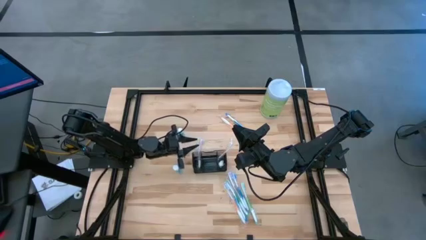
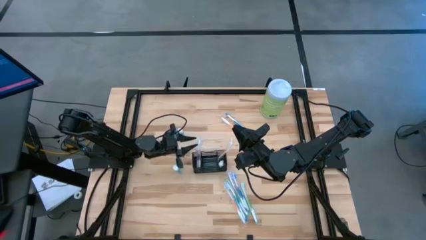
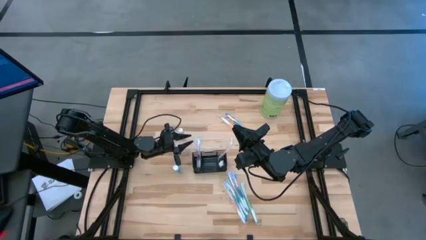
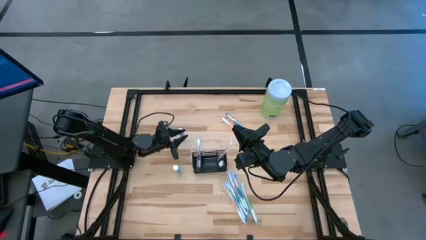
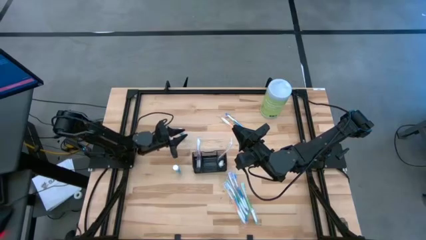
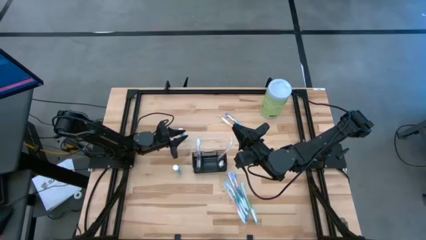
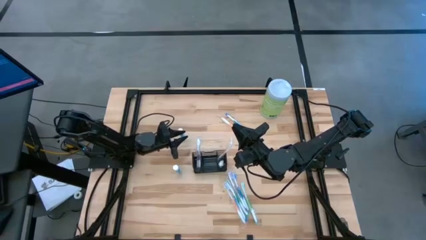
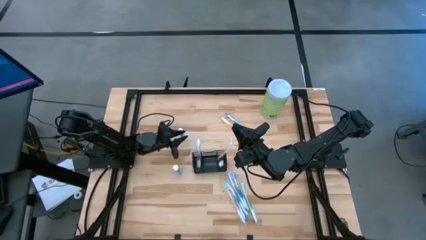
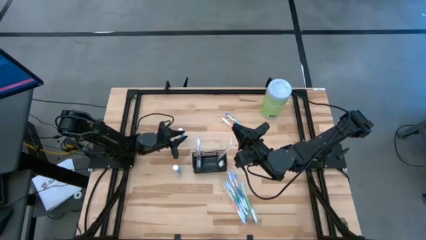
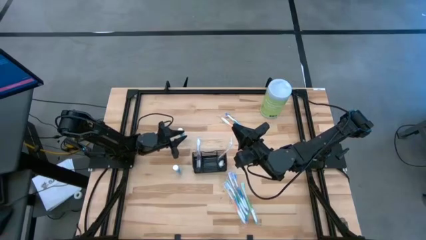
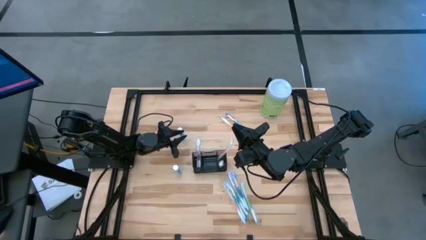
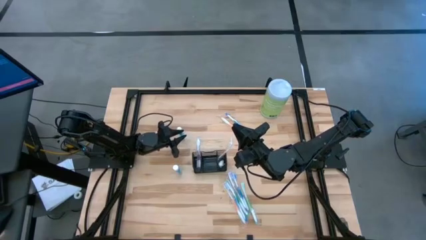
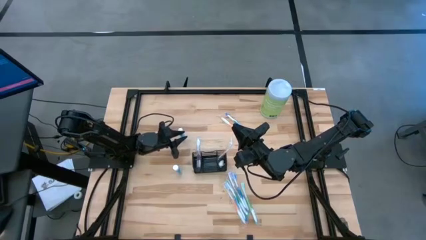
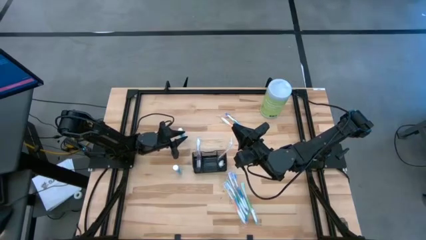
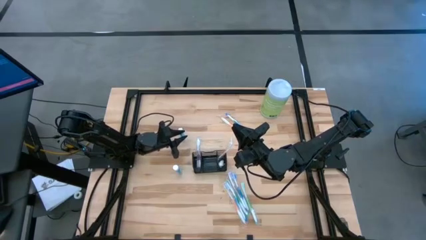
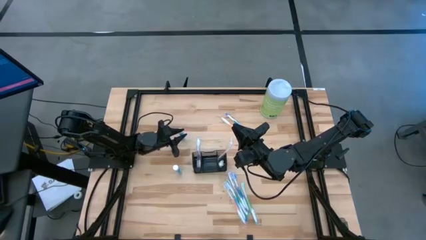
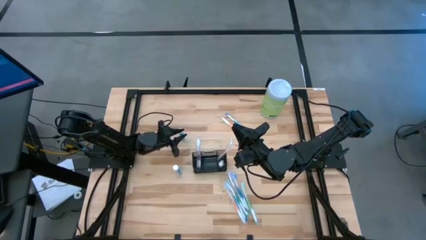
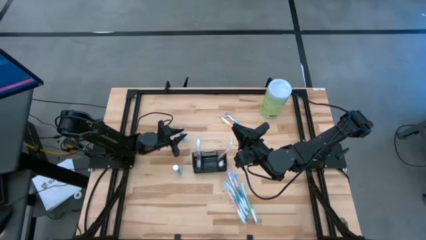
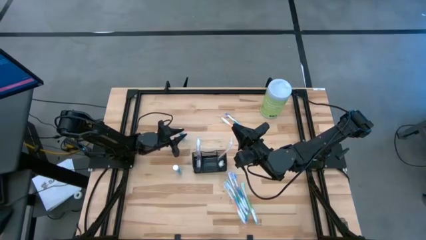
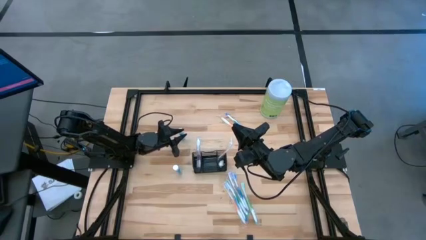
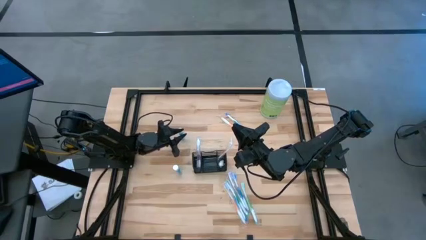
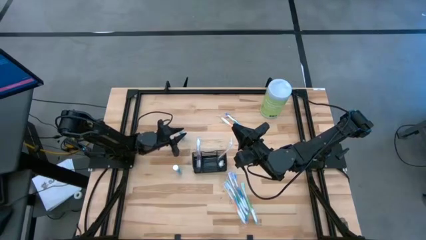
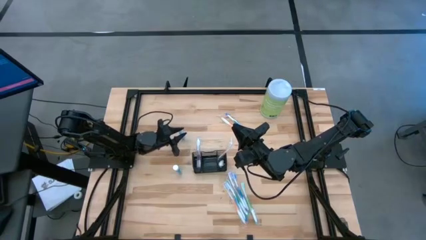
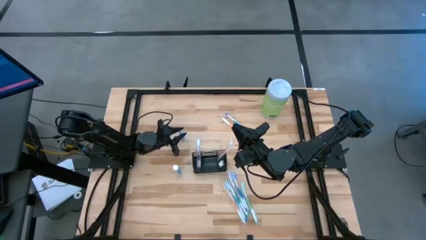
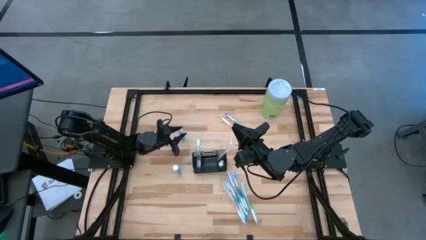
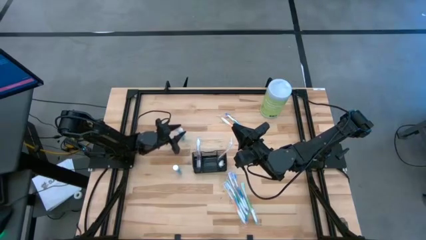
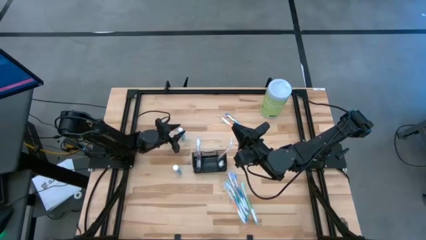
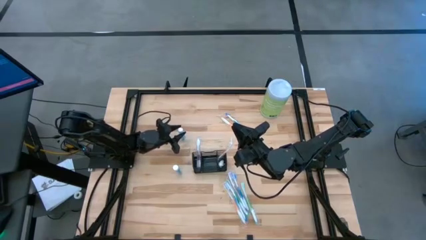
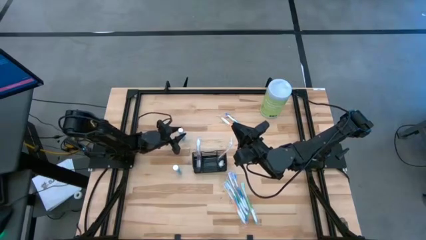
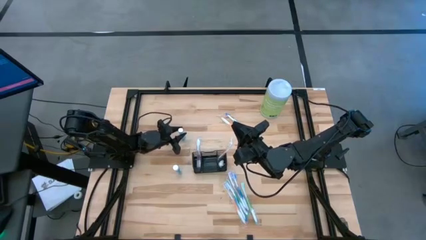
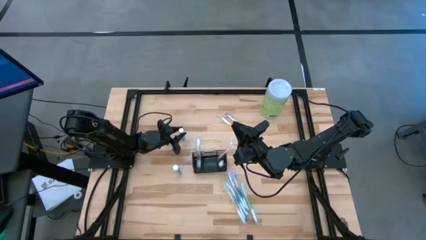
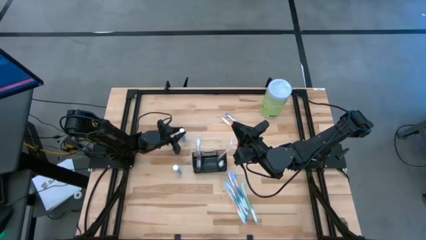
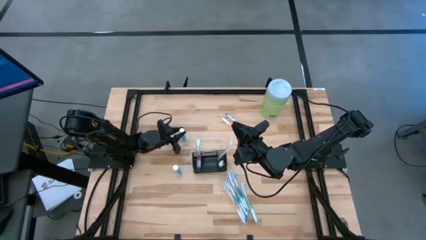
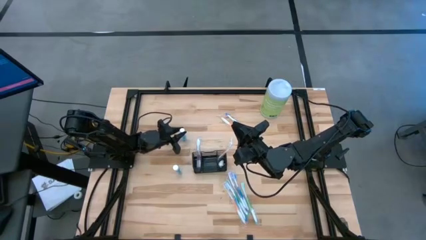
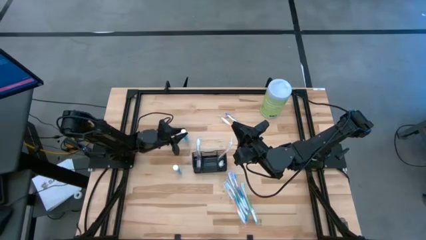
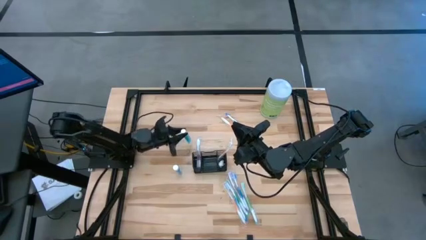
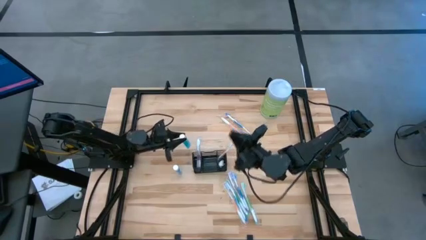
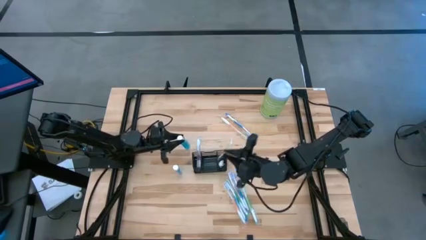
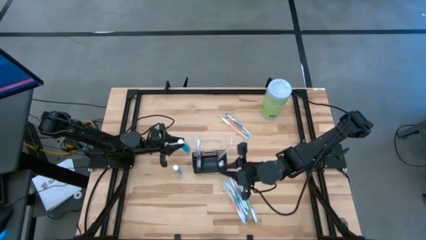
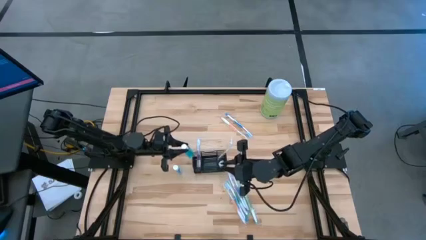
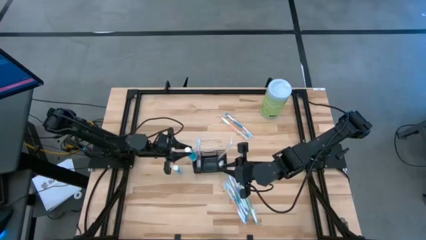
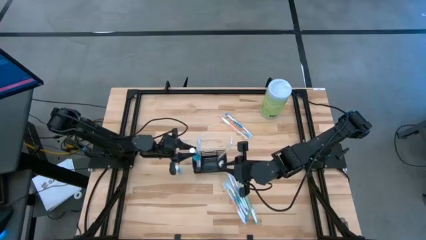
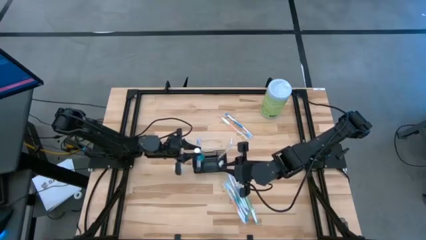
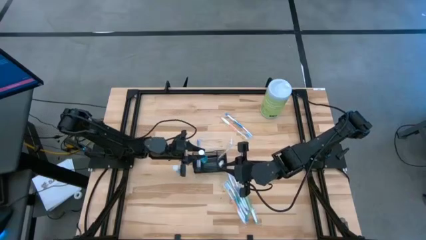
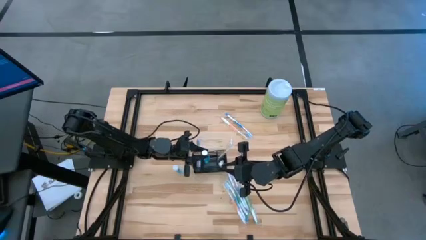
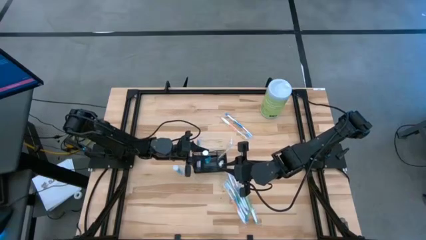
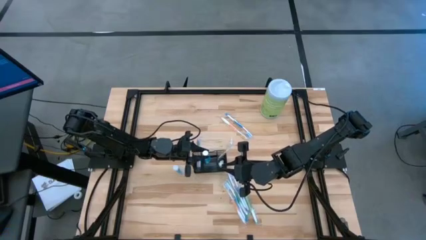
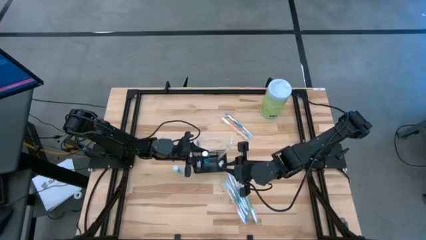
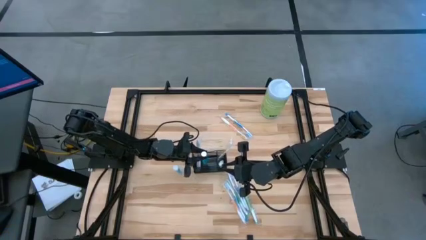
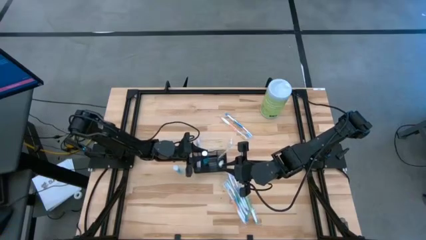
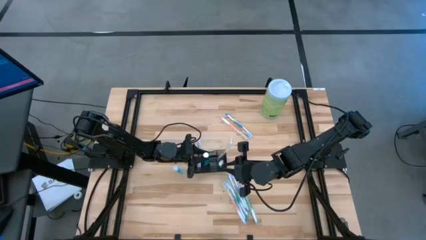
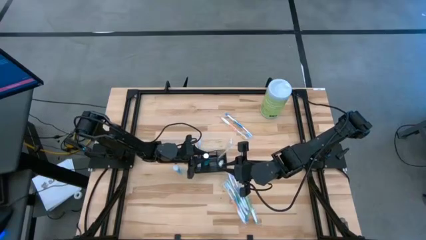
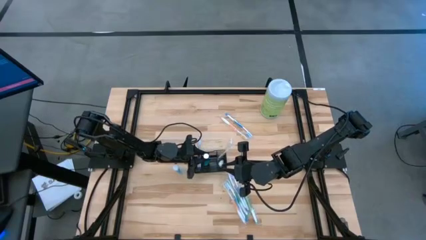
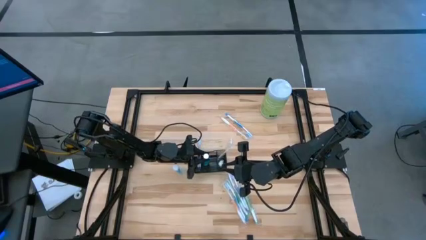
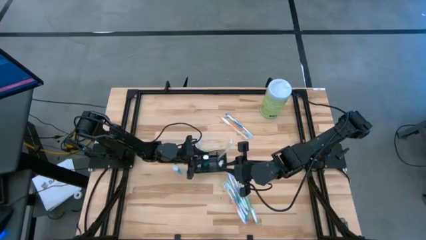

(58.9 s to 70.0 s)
Task: Pick & Place toothbrushing station
Put the mouthwash bottle into the mesh

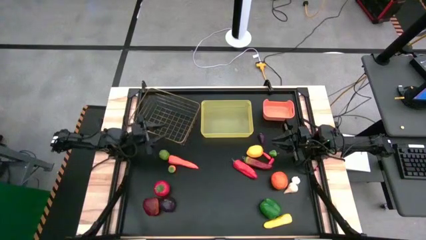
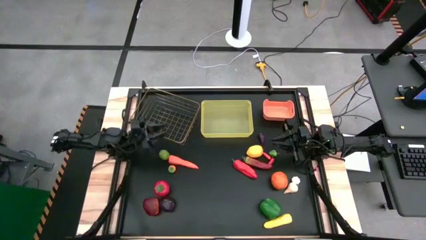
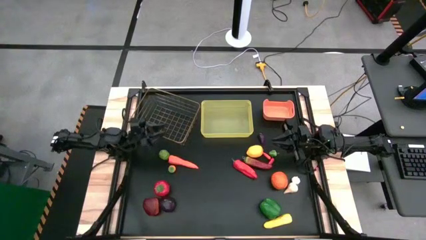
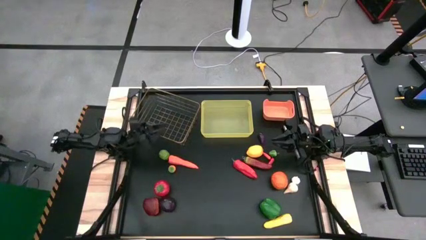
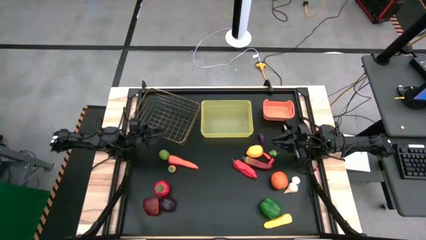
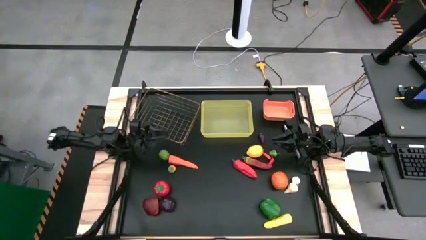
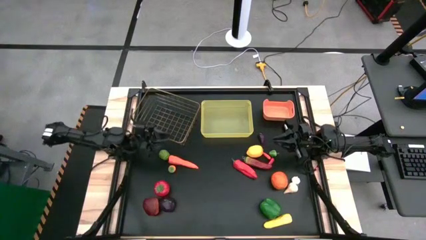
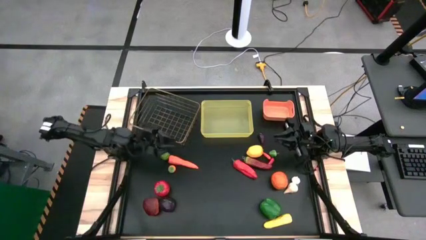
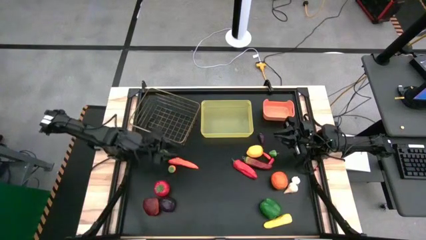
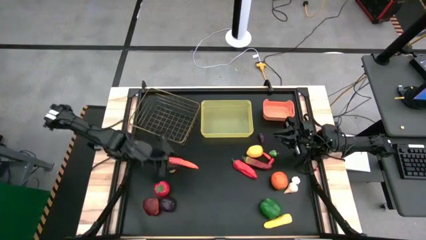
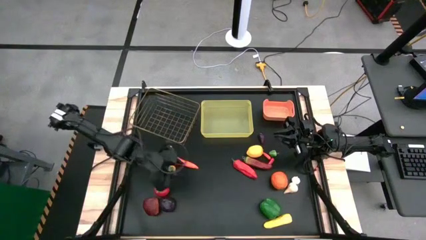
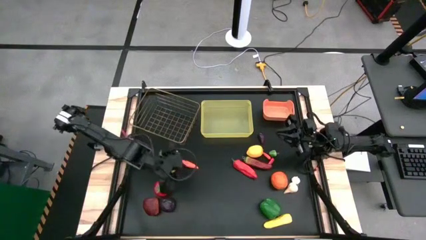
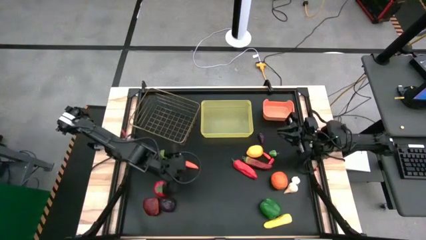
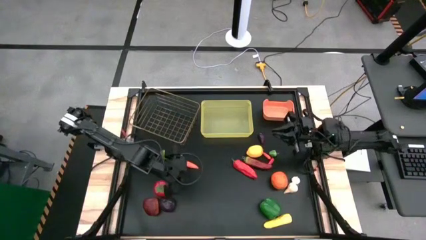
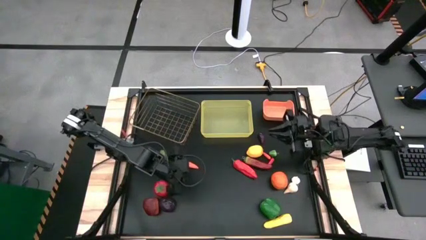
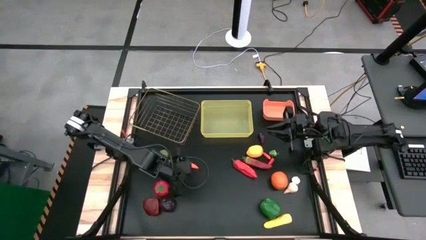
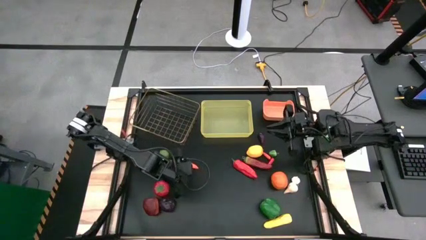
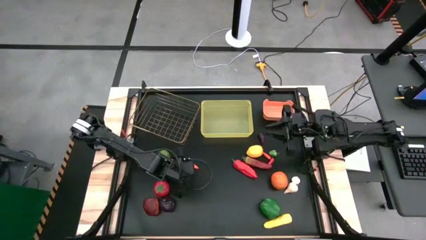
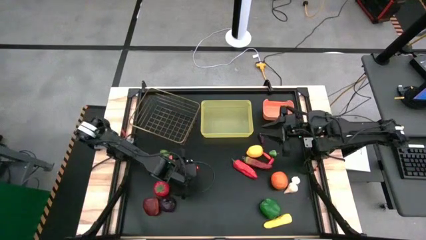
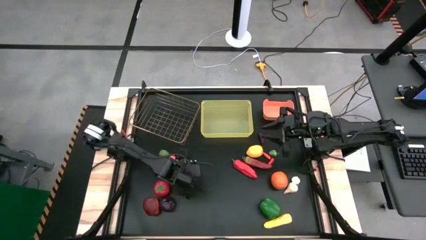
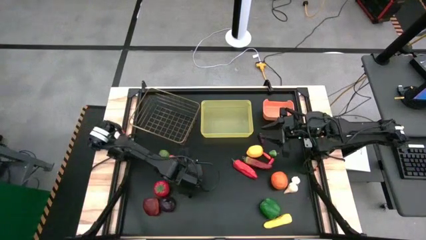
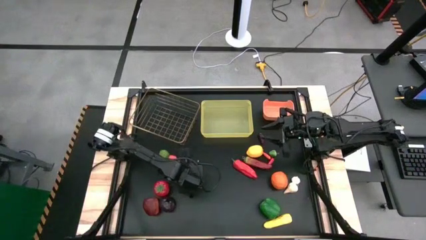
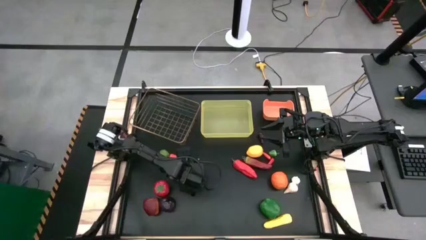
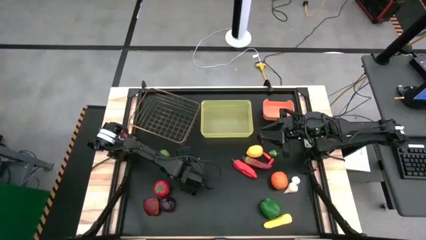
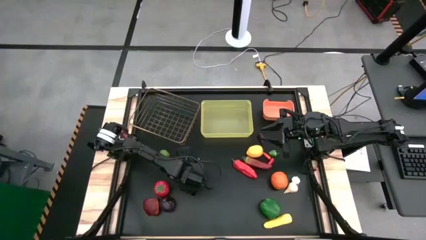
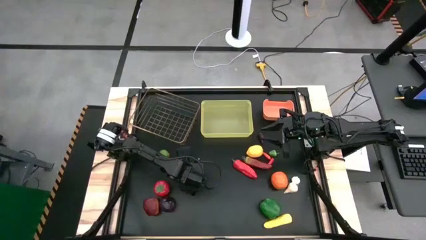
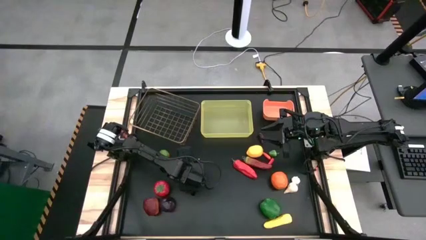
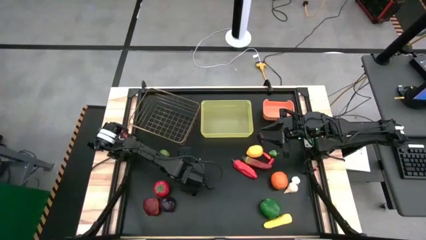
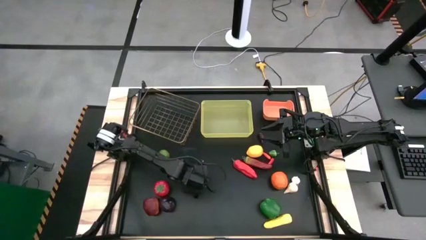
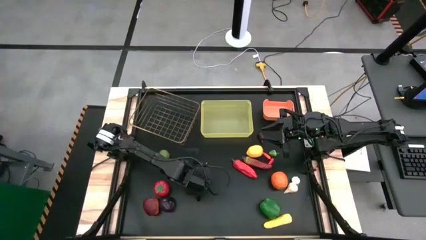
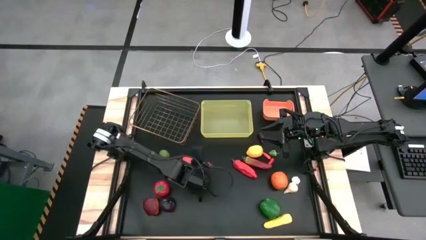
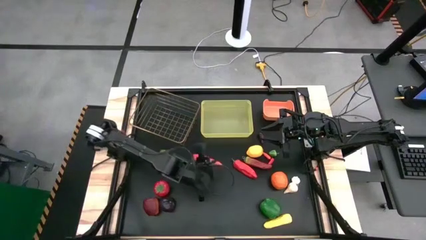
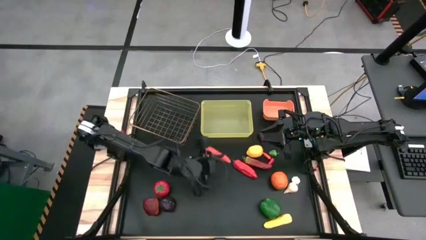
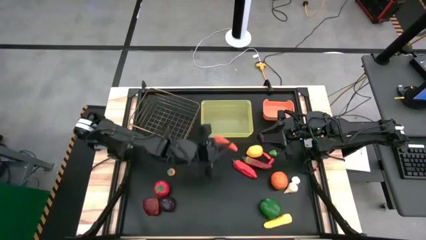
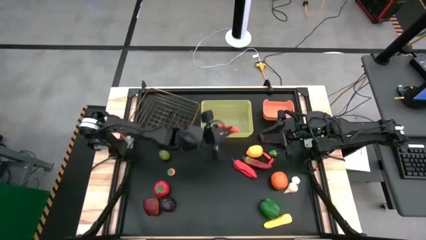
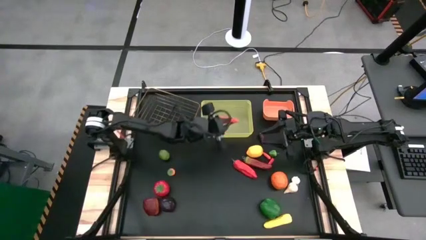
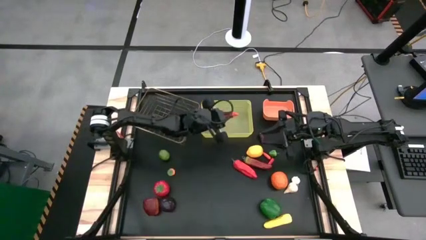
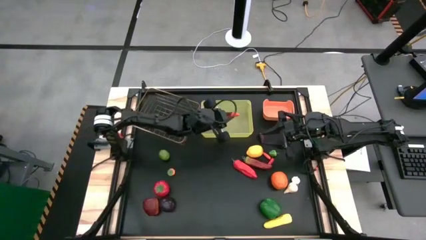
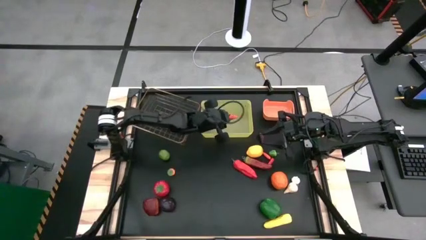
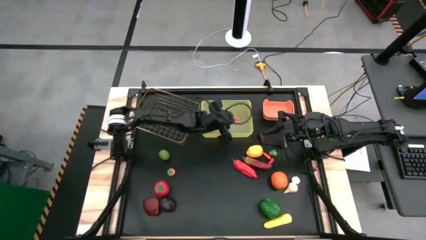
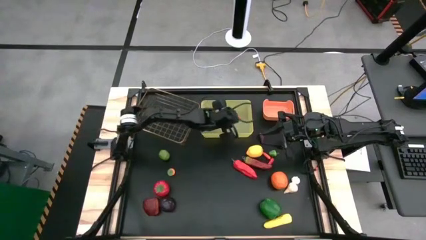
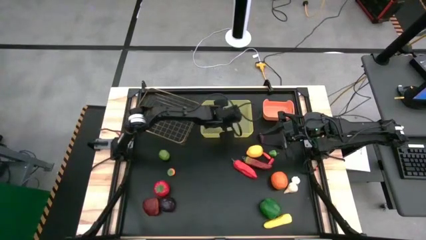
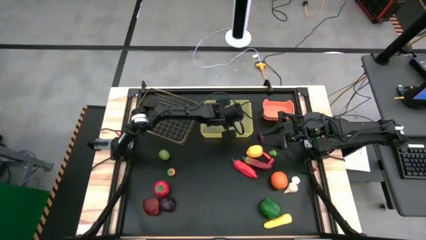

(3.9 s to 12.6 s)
Task: Sort produce into baskets
Put the carrot into the yellow bin
